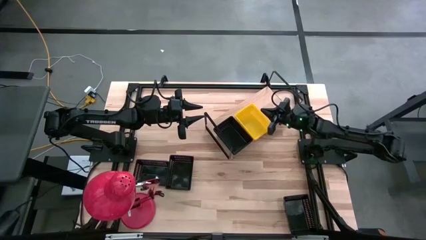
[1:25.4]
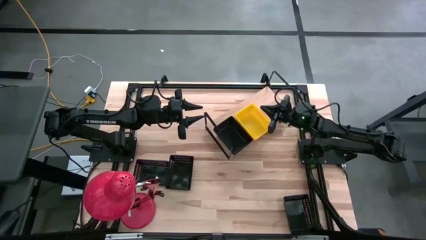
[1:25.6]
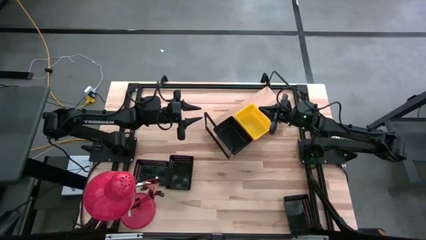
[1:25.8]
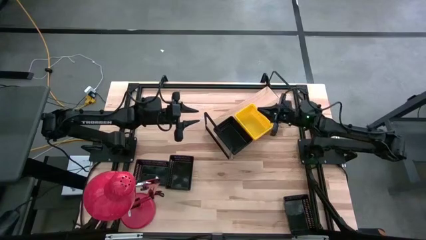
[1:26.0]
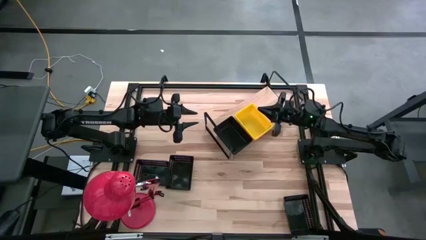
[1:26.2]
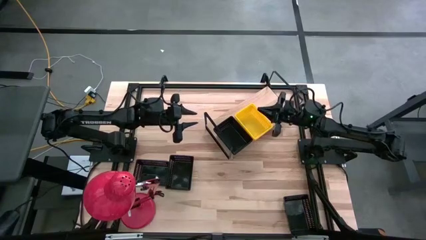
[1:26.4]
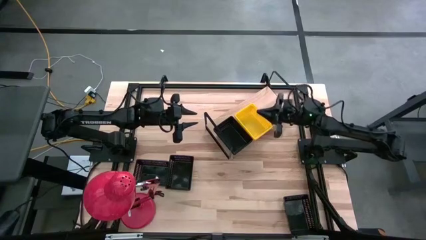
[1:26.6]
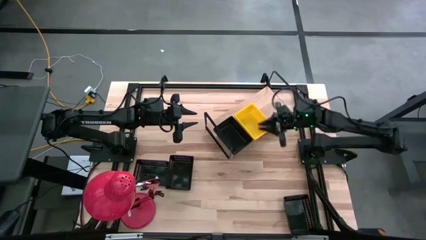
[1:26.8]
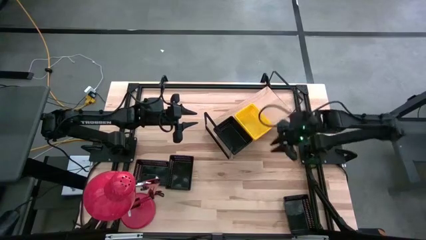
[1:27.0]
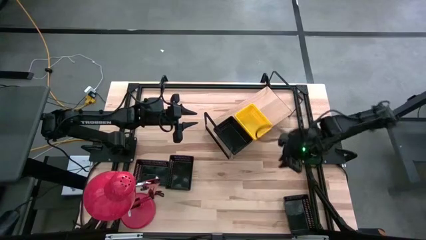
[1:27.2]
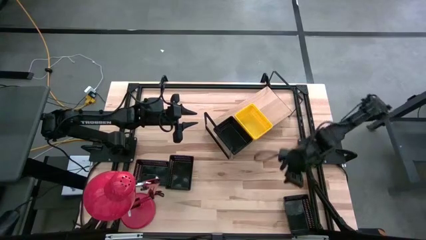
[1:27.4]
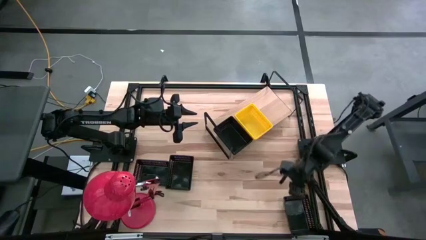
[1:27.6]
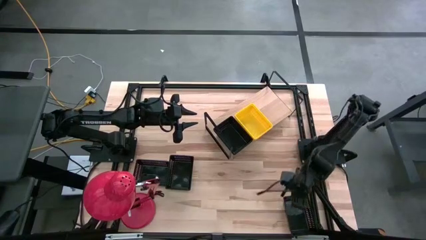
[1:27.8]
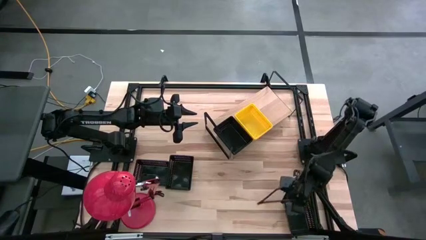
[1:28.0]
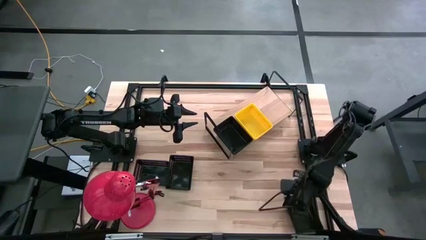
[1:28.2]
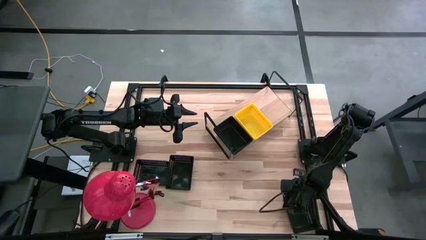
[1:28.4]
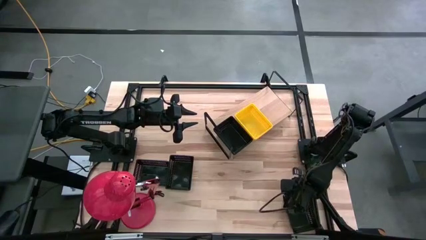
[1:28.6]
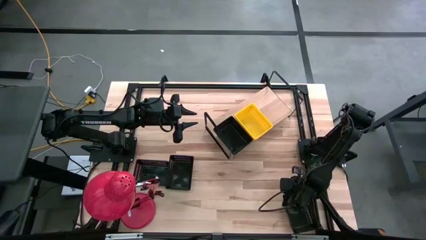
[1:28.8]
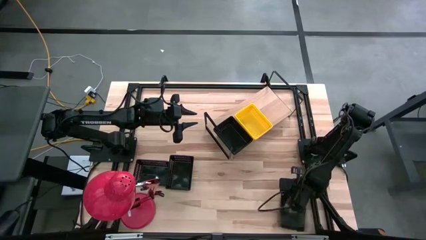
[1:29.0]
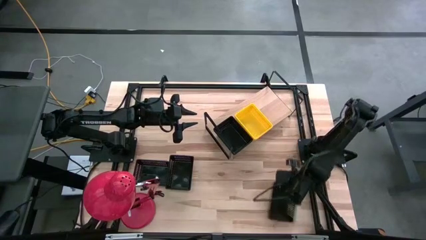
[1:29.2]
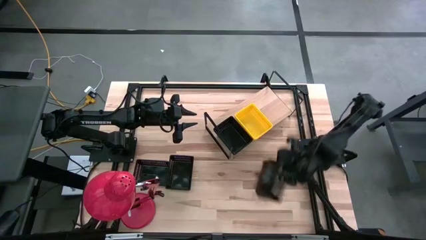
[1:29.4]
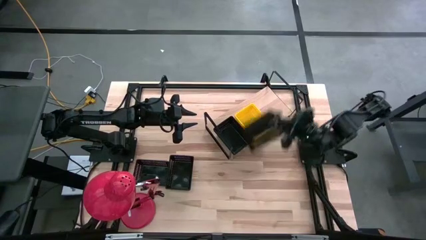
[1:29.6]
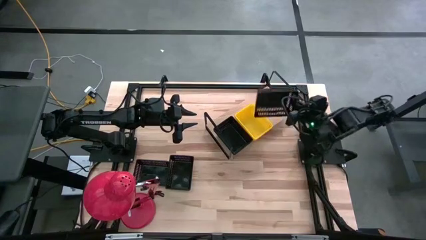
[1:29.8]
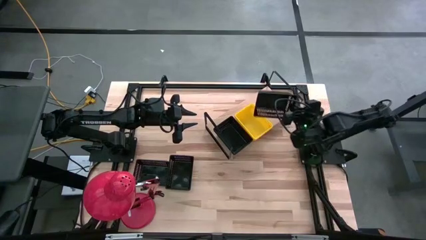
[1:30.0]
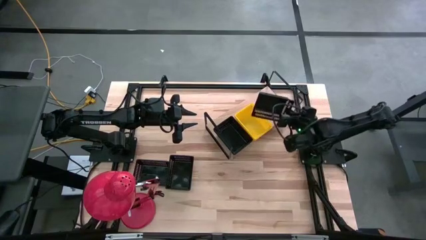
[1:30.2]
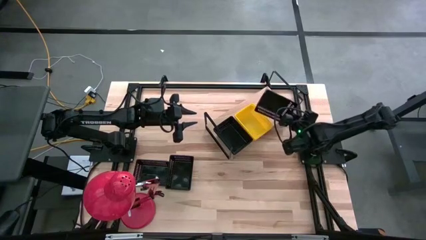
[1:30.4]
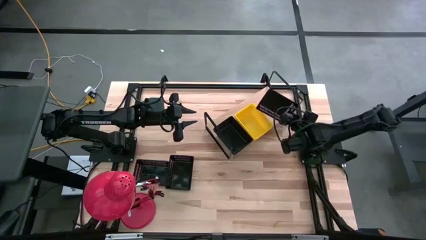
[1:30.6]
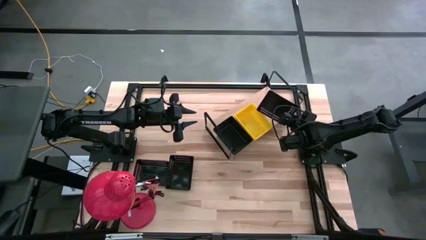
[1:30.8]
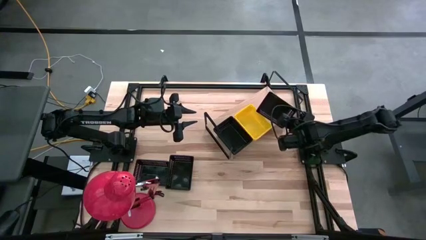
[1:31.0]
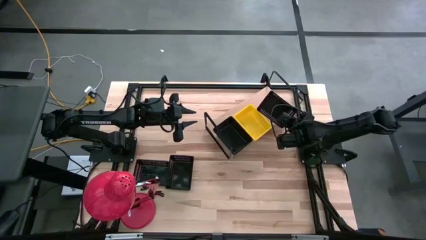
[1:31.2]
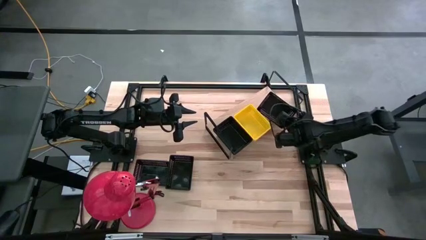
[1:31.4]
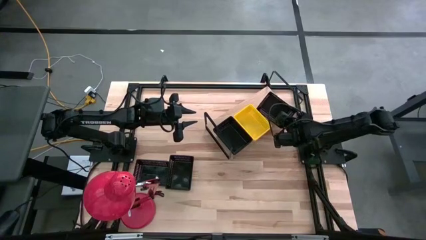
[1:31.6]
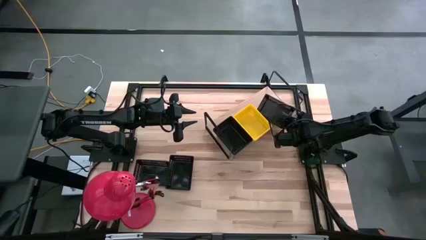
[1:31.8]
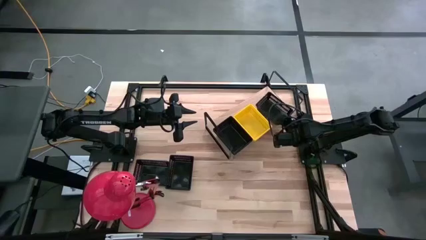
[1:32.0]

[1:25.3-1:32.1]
Task: Stack baskets on shelf by color
Put the black bin on the shelf

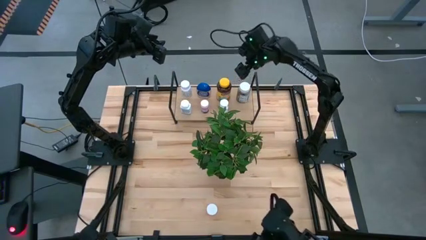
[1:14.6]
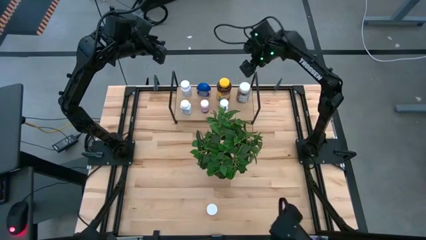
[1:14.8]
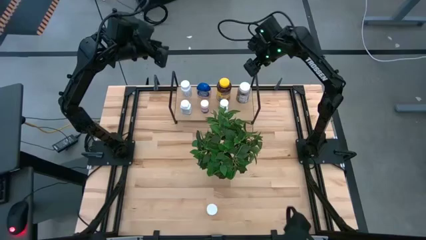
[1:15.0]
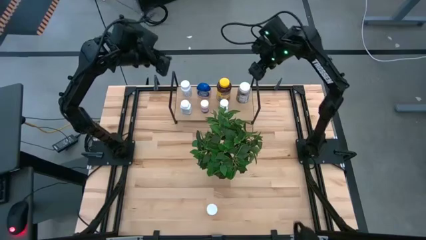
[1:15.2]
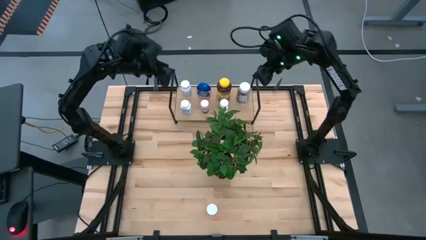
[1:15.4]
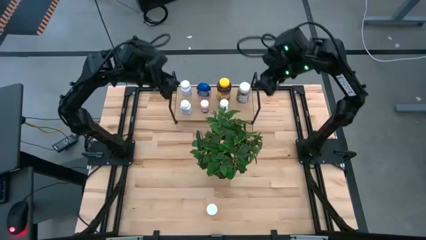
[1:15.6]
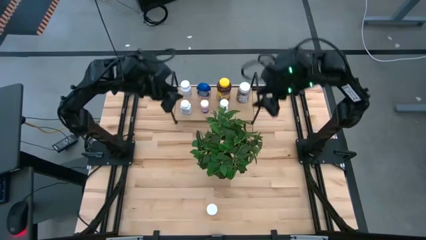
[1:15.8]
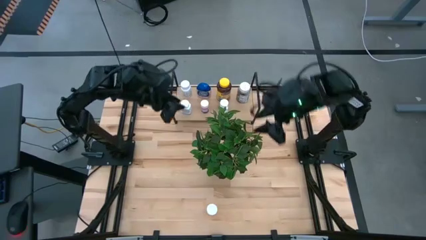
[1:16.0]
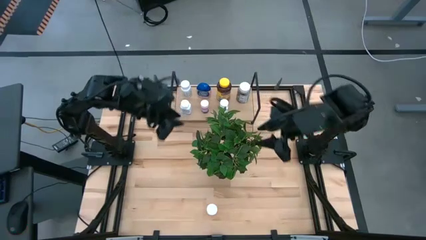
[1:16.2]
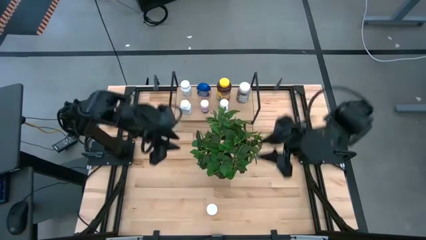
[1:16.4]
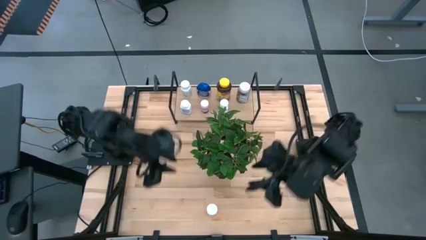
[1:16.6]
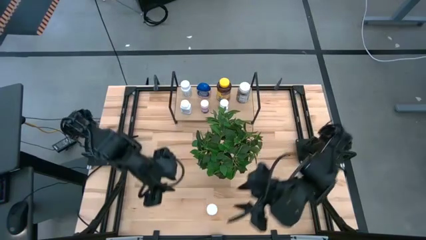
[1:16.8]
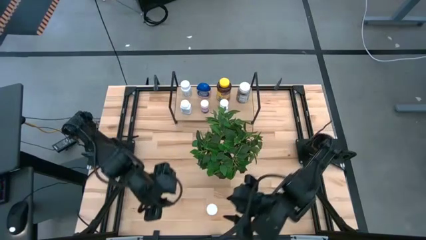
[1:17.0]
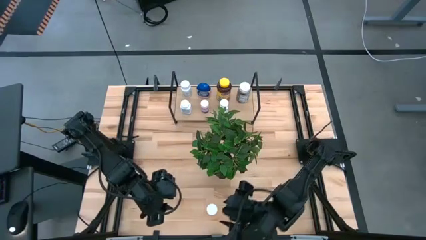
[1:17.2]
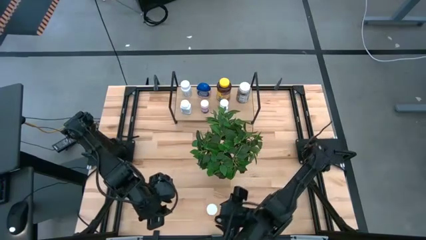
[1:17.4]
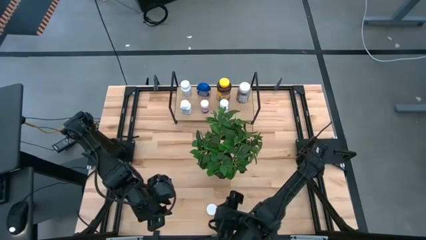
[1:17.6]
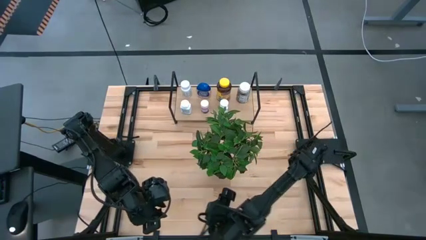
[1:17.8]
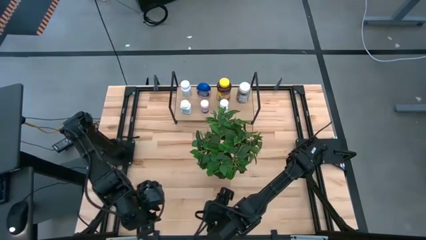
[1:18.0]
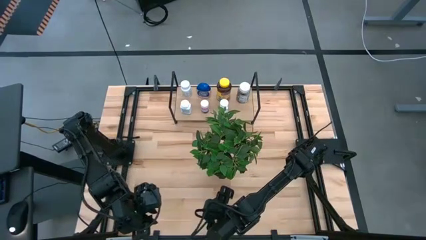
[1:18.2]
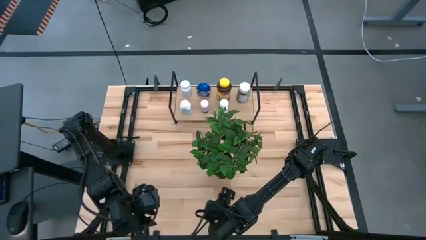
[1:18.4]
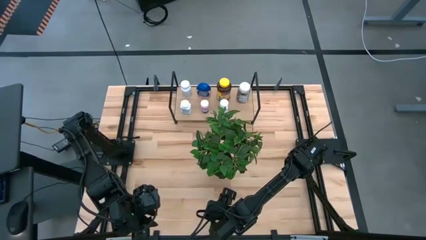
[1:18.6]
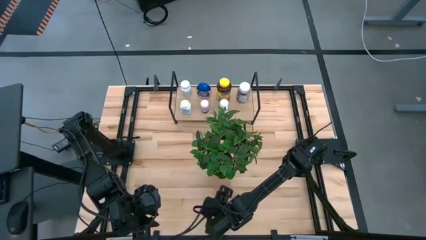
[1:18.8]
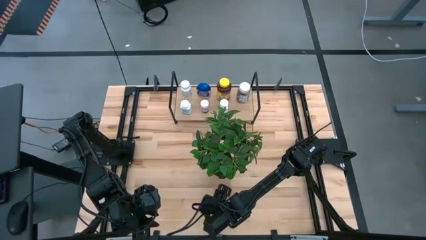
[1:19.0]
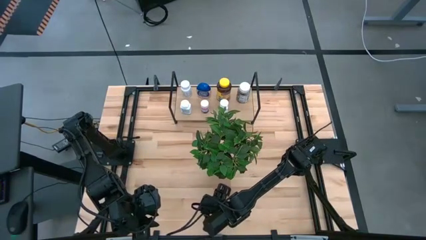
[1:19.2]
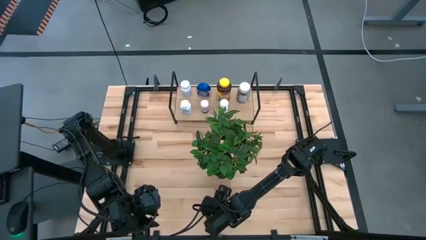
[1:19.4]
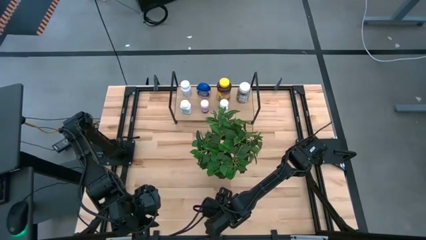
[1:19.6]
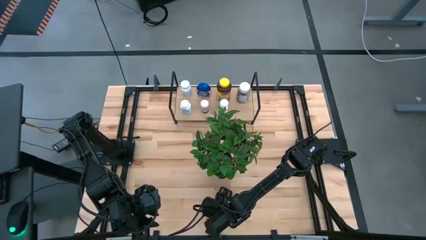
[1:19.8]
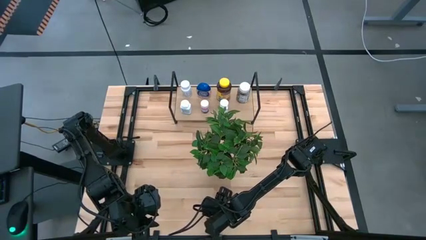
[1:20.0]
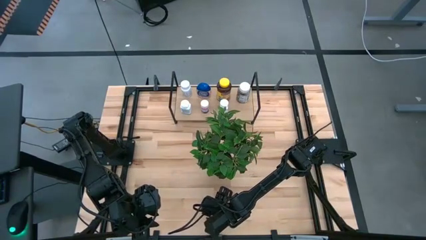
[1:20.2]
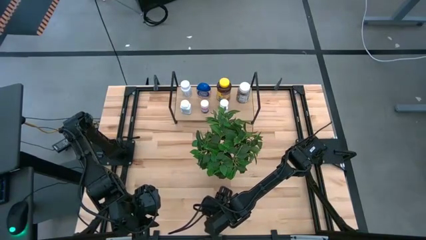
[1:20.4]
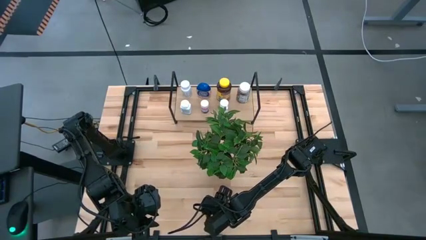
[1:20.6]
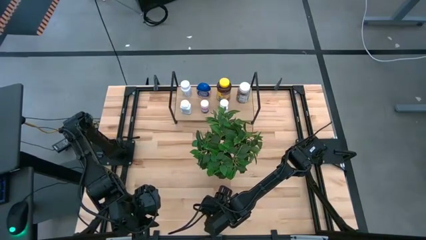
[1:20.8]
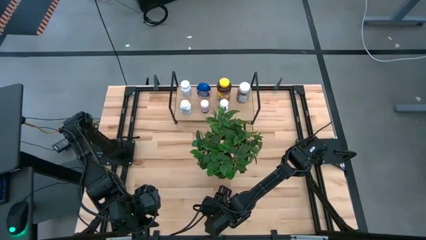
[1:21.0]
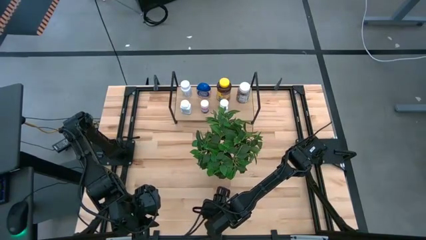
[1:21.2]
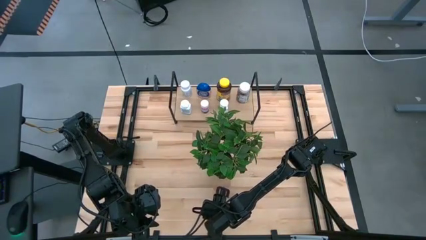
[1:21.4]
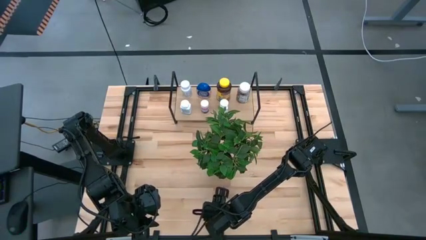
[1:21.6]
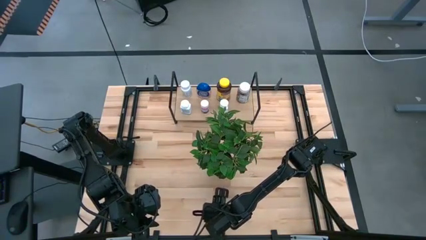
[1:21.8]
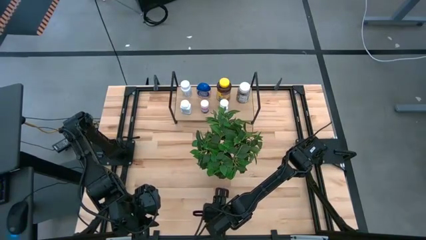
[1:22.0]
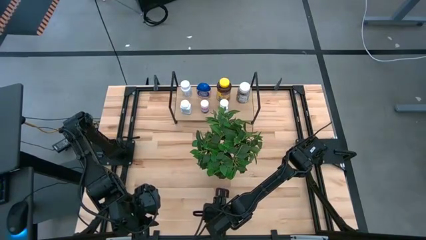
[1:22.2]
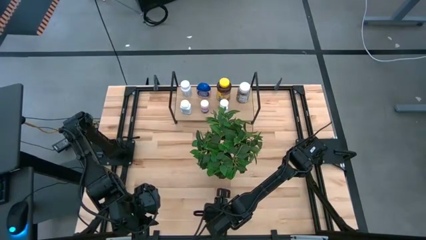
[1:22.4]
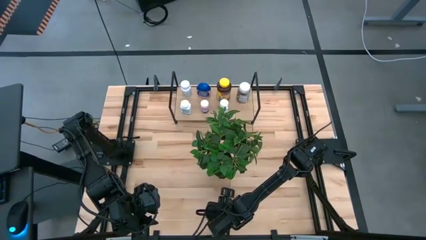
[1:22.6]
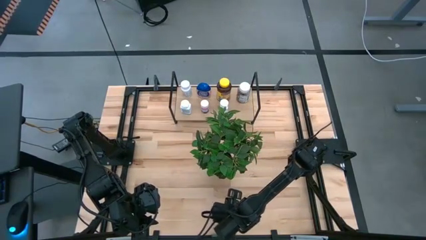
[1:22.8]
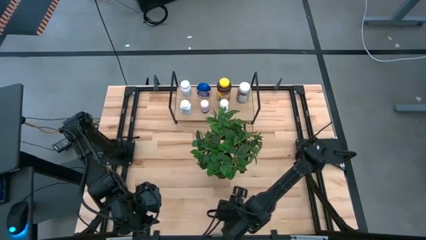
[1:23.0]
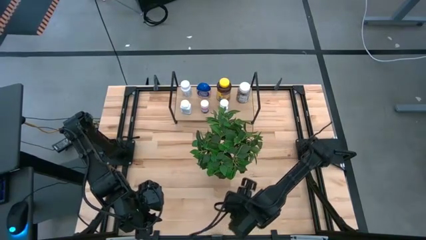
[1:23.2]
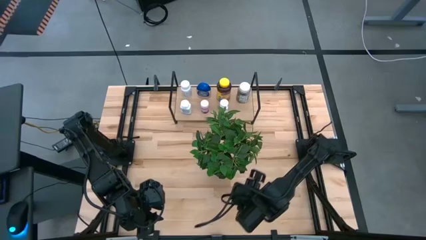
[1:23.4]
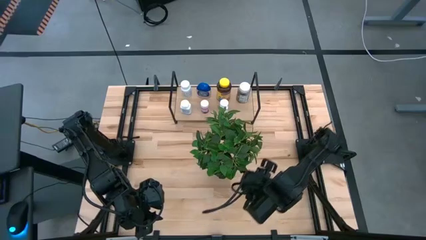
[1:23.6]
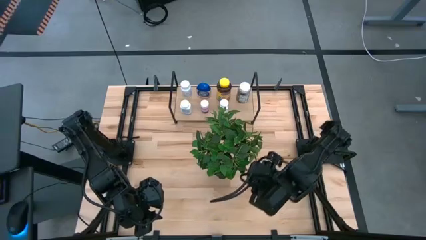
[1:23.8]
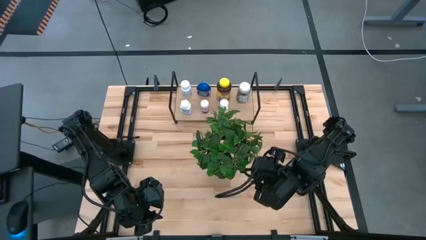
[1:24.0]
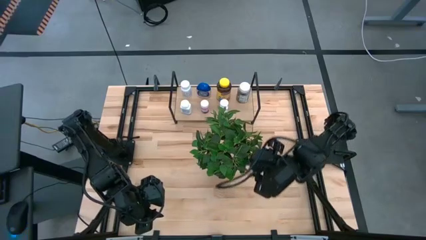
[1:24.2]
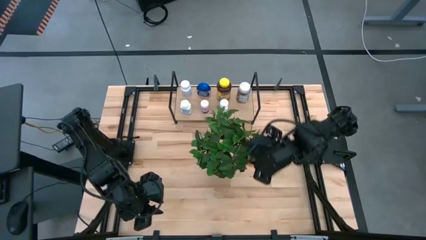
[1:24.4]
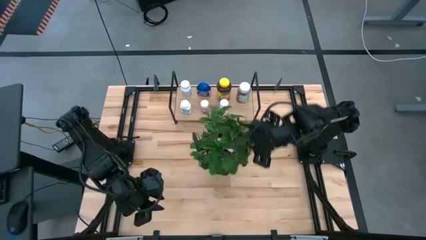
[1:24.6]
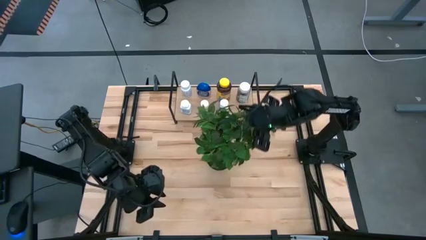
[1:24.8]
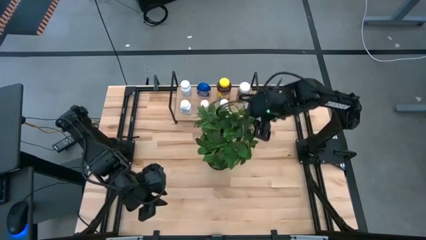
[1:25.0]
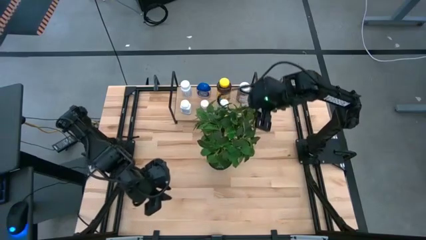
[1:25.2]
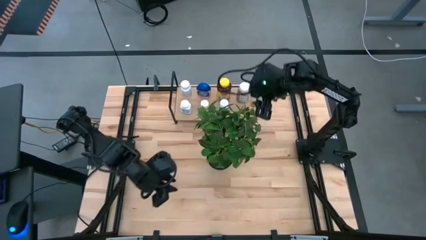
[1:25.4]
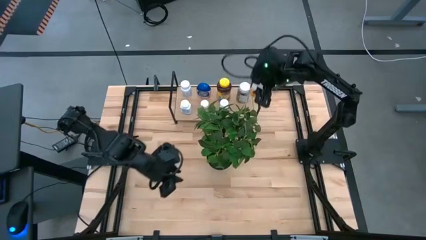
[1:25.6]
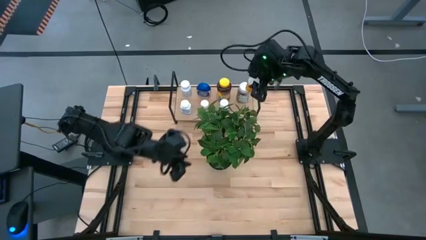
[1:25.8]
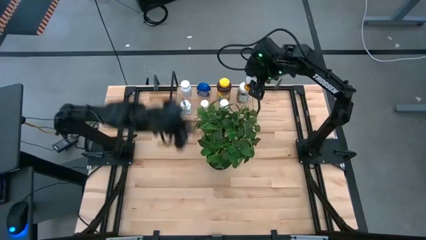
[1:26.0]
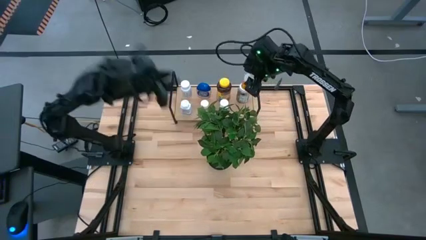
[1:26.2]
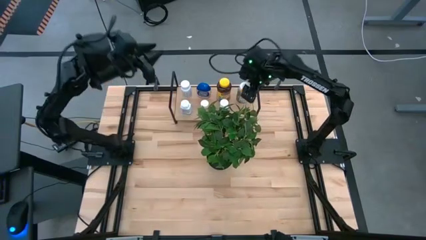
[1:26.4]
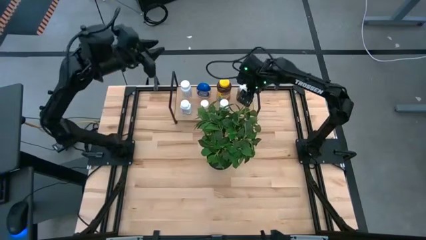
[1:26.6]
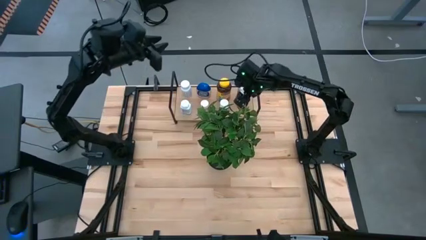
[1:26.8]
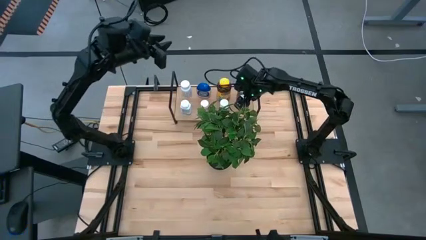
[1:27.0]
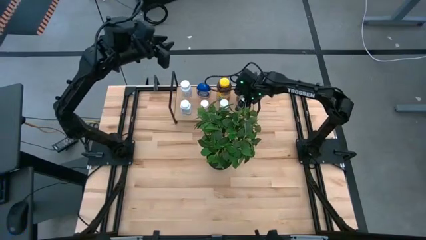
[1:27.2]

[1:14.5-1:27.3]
Task: Pick and place medicine bottles onto shelf by color
Put the orange pill bottle on the shelf
